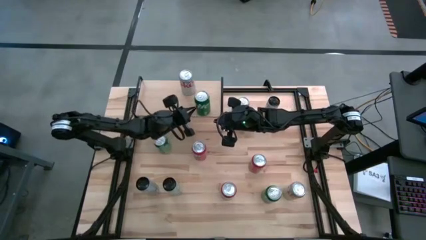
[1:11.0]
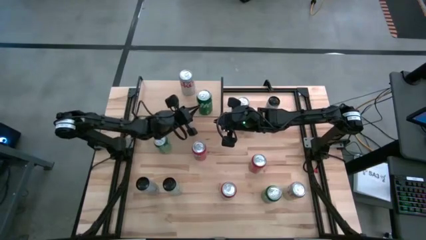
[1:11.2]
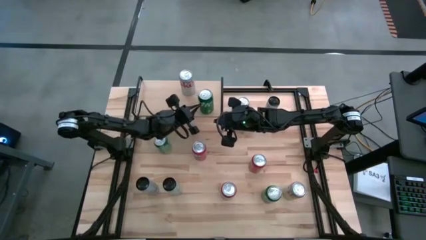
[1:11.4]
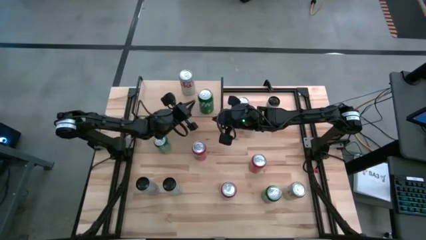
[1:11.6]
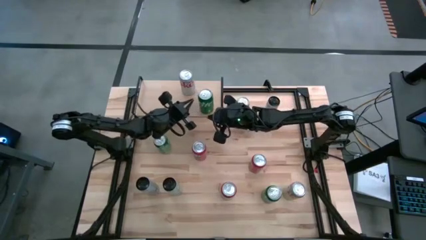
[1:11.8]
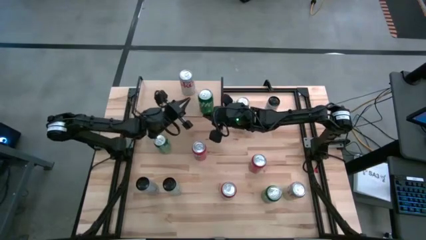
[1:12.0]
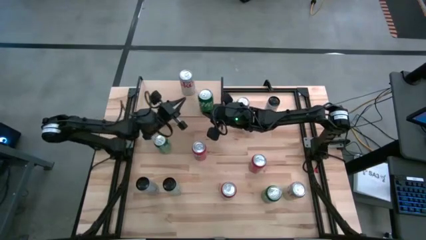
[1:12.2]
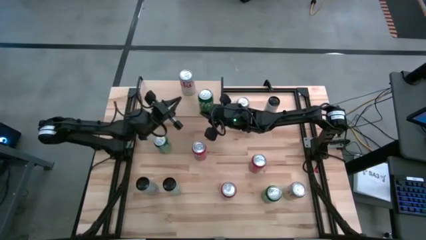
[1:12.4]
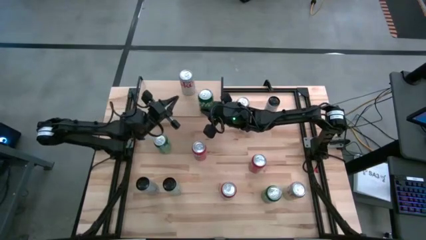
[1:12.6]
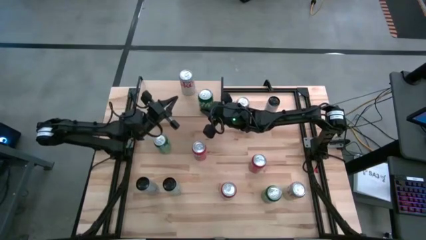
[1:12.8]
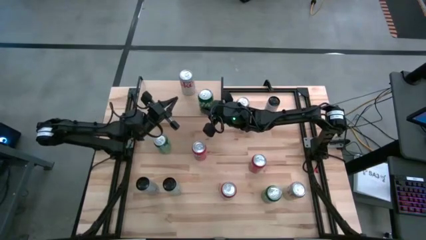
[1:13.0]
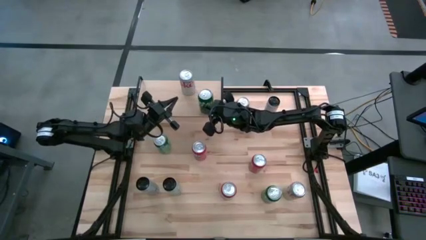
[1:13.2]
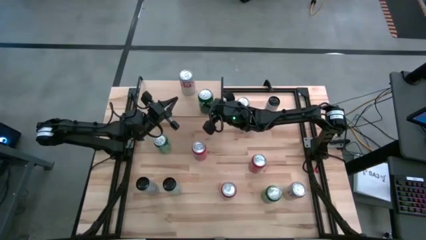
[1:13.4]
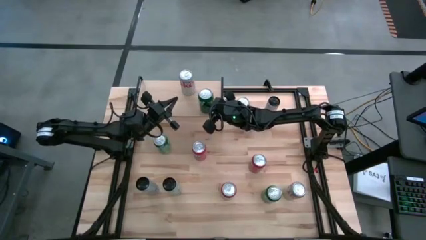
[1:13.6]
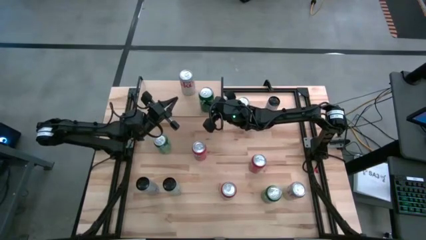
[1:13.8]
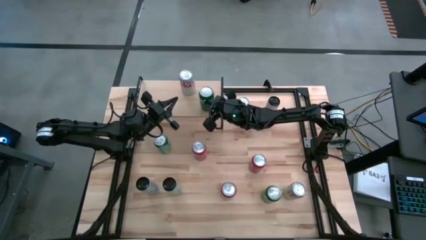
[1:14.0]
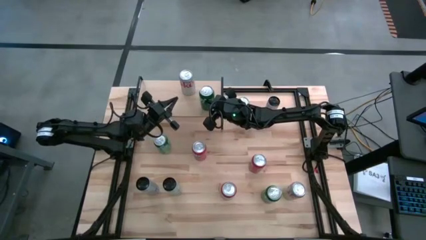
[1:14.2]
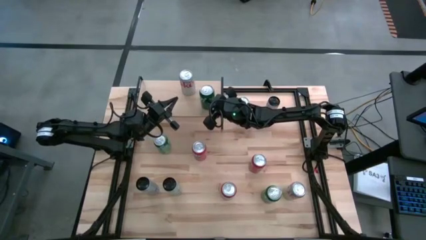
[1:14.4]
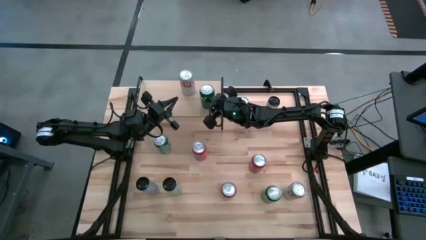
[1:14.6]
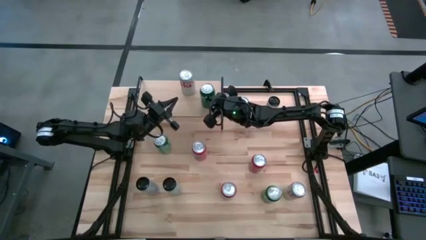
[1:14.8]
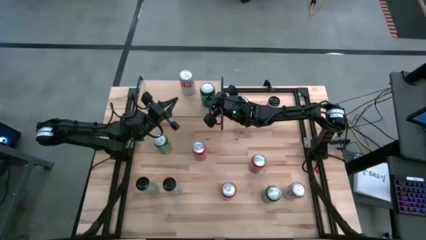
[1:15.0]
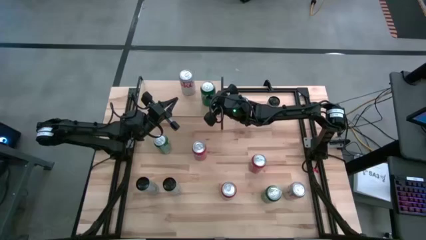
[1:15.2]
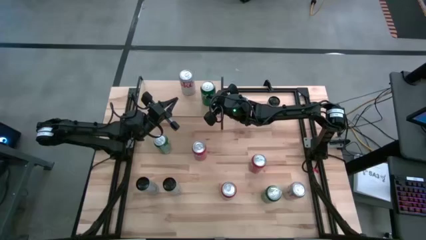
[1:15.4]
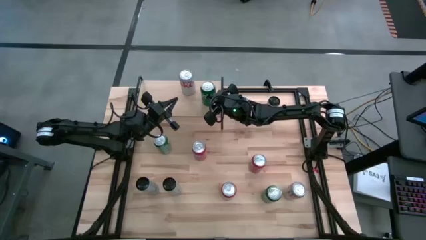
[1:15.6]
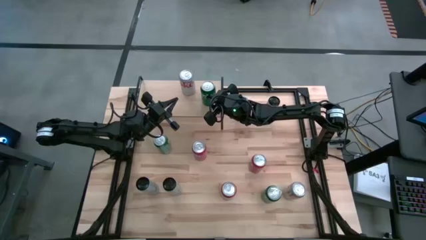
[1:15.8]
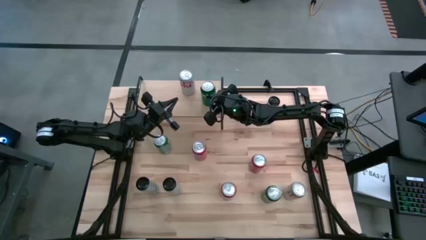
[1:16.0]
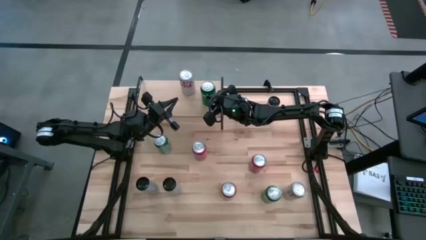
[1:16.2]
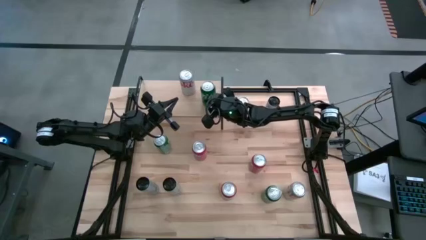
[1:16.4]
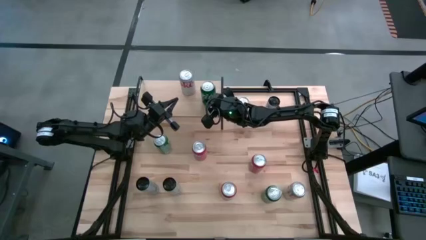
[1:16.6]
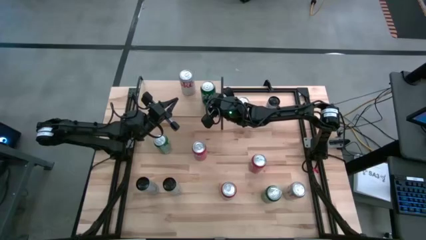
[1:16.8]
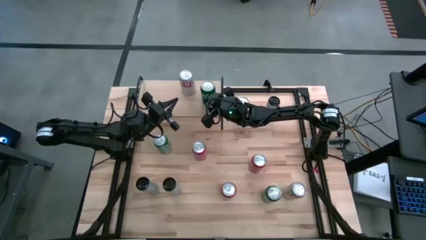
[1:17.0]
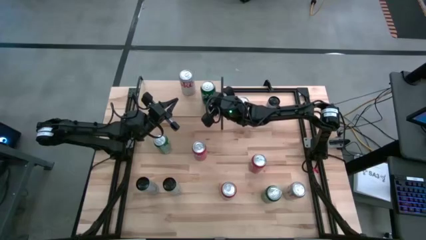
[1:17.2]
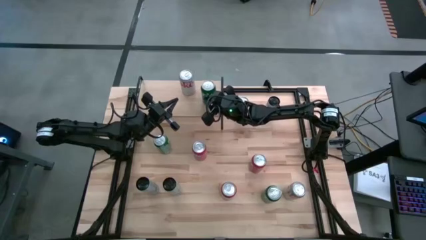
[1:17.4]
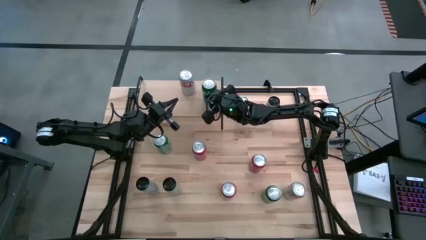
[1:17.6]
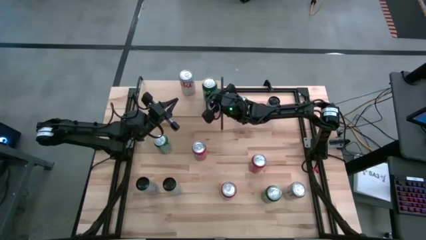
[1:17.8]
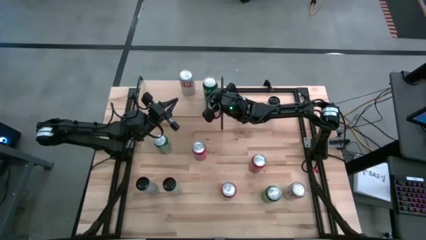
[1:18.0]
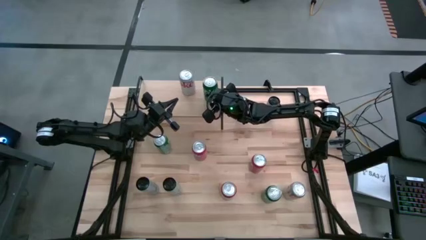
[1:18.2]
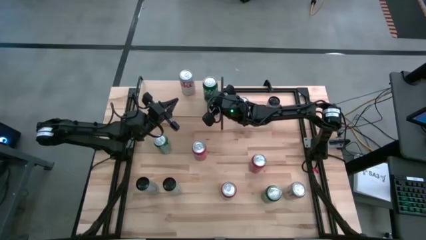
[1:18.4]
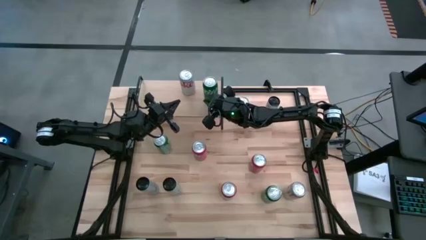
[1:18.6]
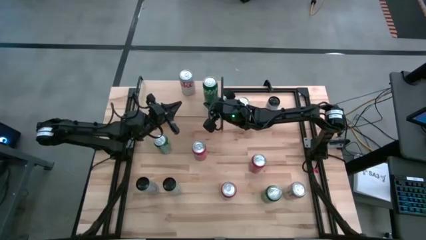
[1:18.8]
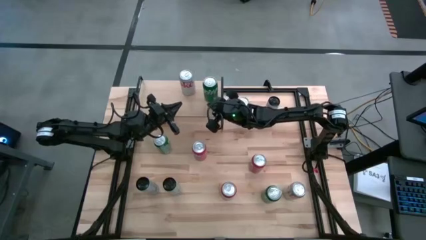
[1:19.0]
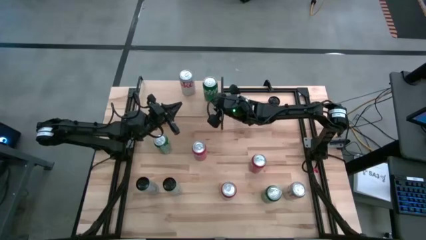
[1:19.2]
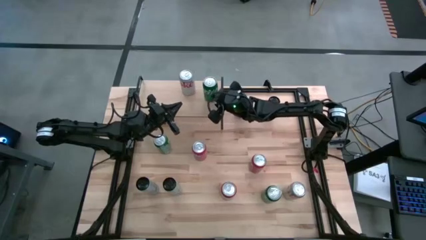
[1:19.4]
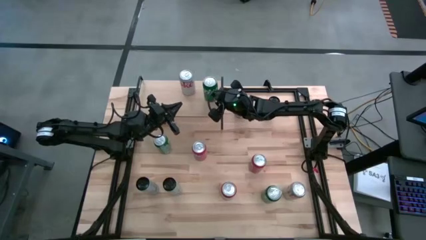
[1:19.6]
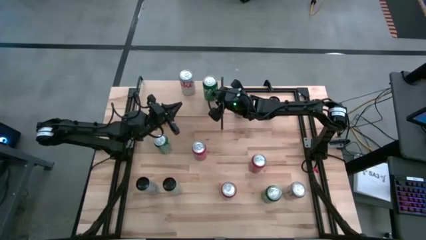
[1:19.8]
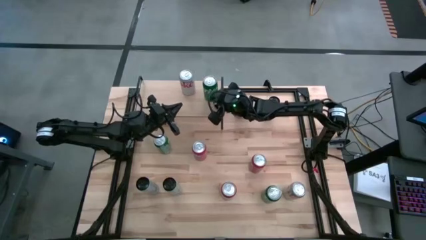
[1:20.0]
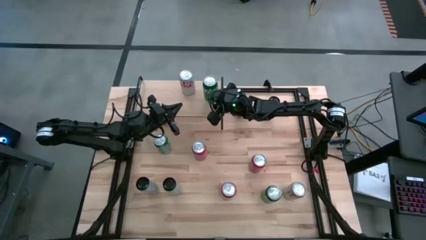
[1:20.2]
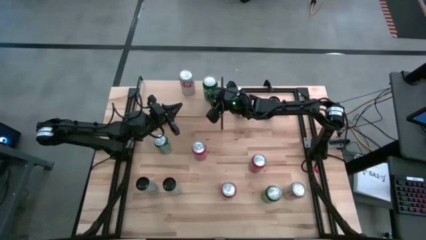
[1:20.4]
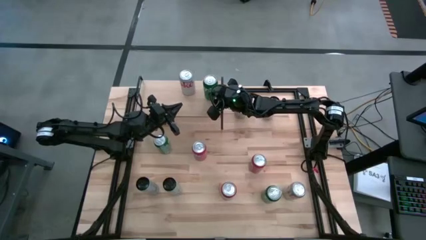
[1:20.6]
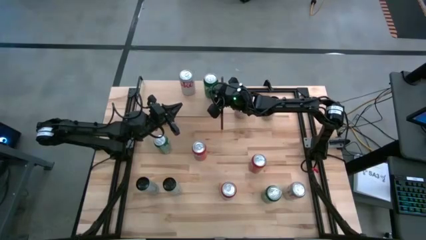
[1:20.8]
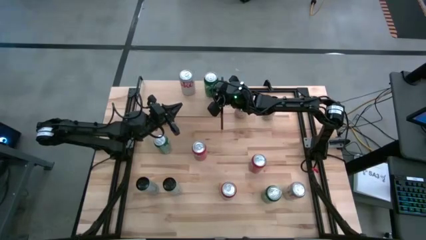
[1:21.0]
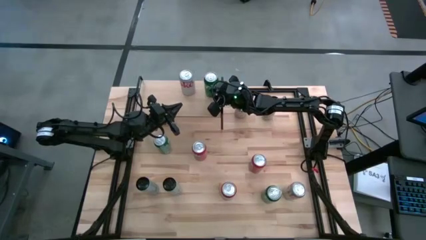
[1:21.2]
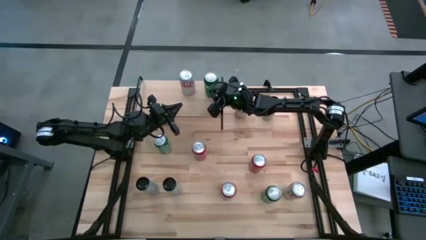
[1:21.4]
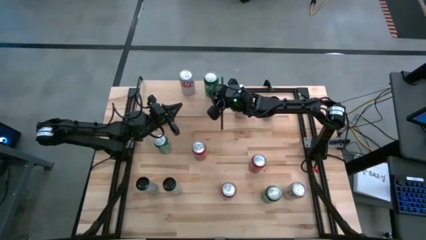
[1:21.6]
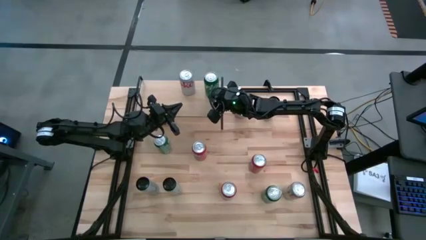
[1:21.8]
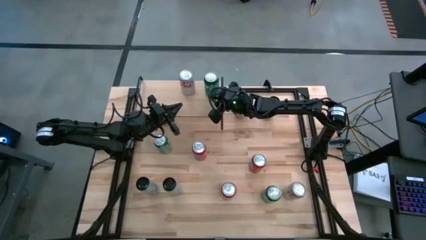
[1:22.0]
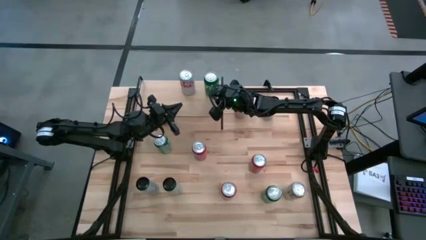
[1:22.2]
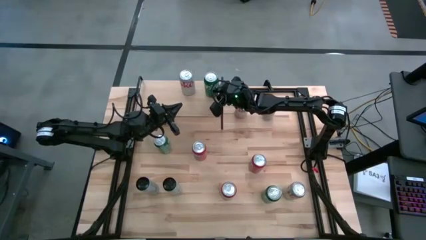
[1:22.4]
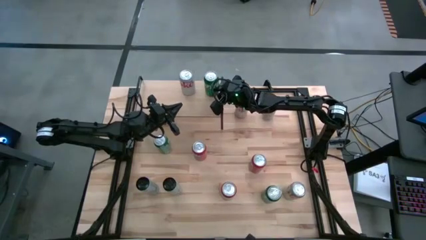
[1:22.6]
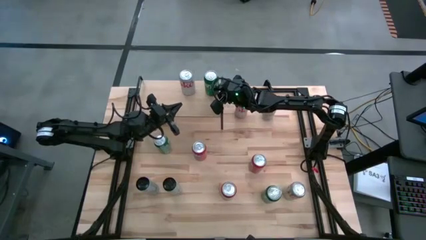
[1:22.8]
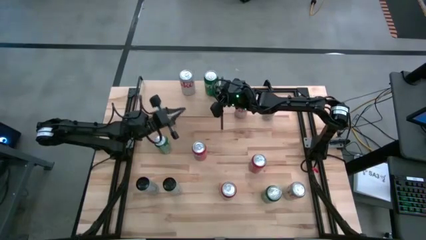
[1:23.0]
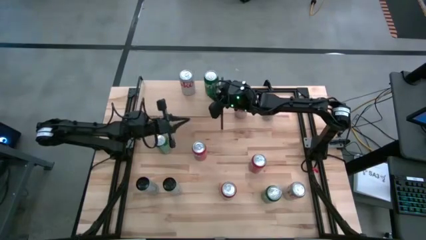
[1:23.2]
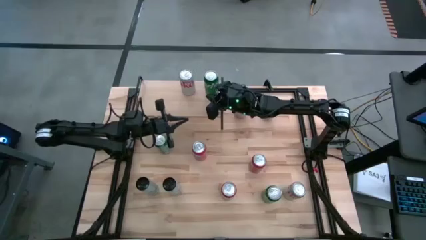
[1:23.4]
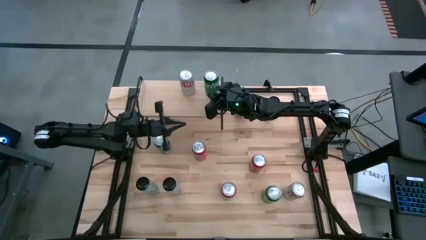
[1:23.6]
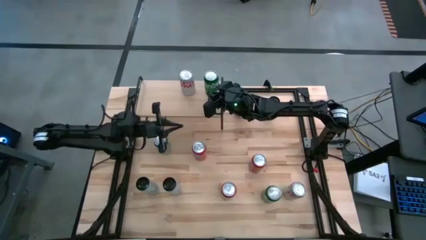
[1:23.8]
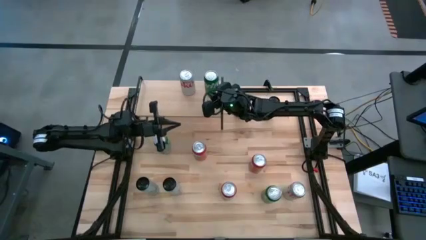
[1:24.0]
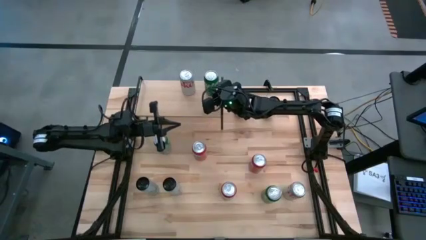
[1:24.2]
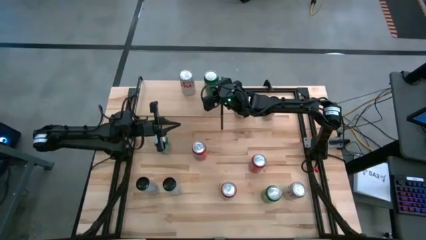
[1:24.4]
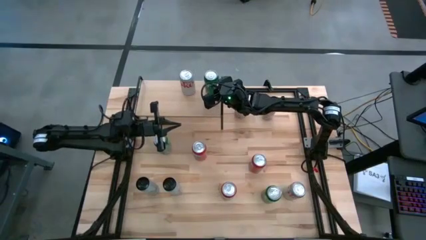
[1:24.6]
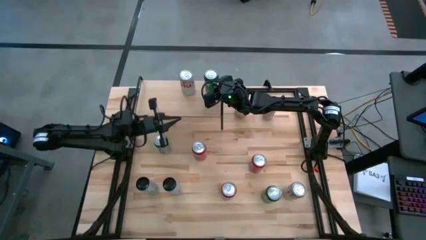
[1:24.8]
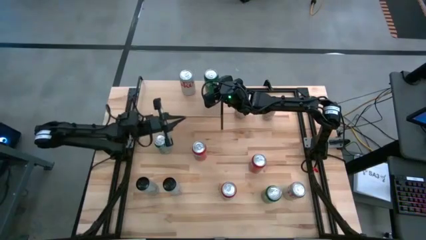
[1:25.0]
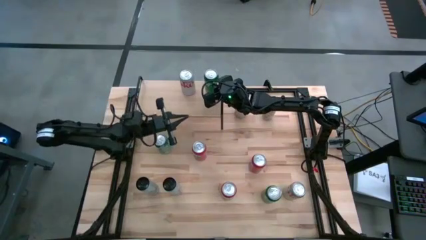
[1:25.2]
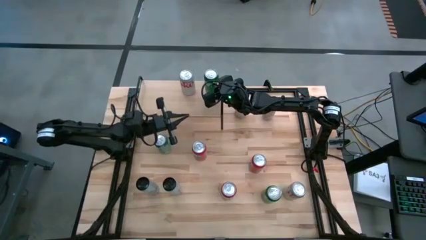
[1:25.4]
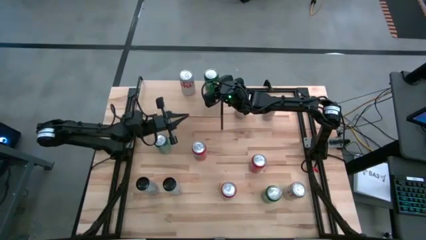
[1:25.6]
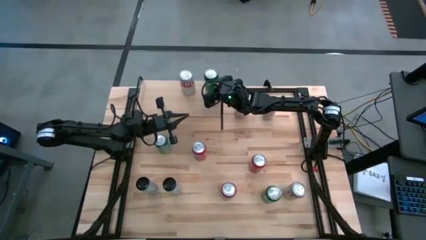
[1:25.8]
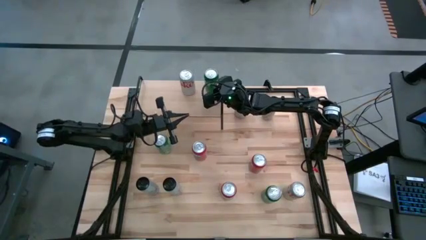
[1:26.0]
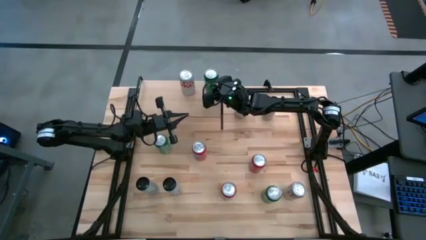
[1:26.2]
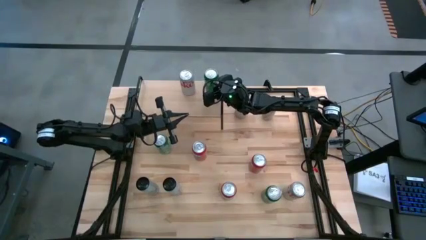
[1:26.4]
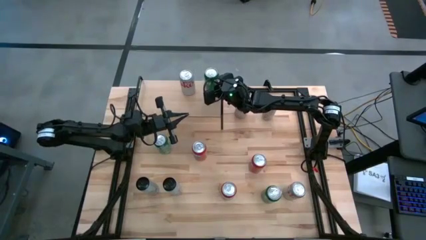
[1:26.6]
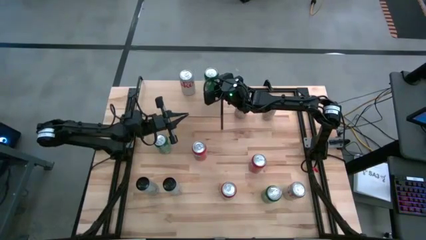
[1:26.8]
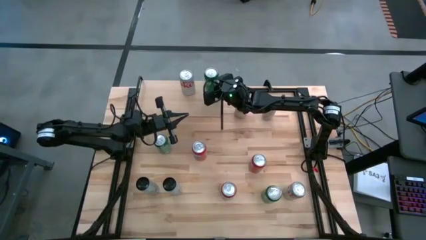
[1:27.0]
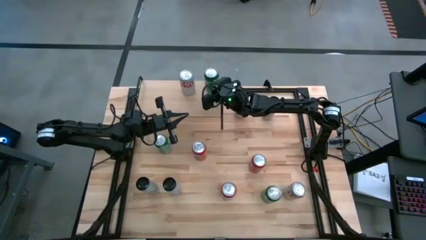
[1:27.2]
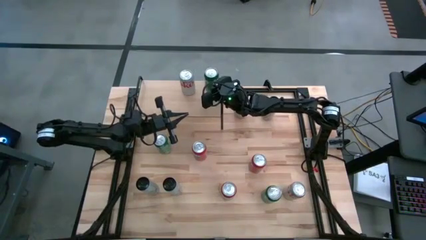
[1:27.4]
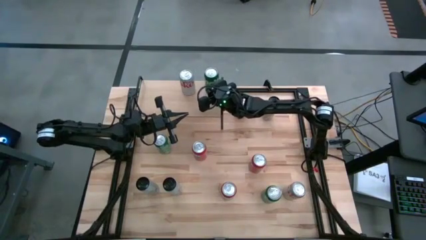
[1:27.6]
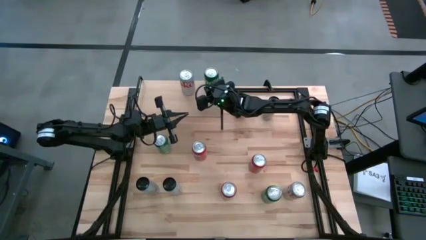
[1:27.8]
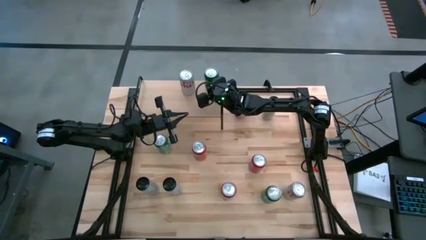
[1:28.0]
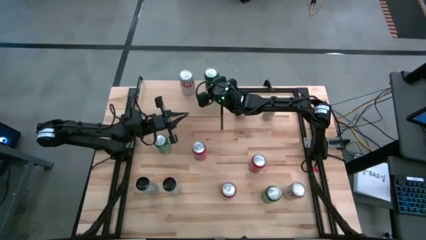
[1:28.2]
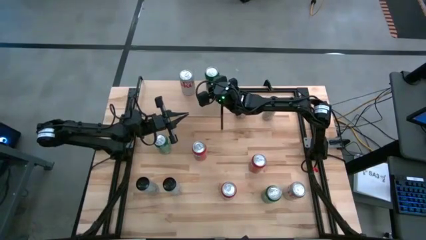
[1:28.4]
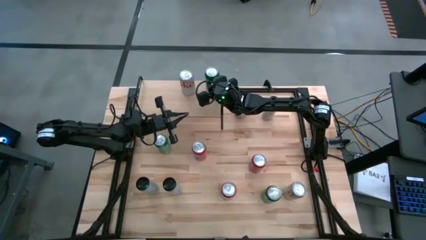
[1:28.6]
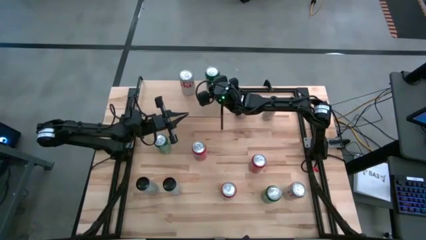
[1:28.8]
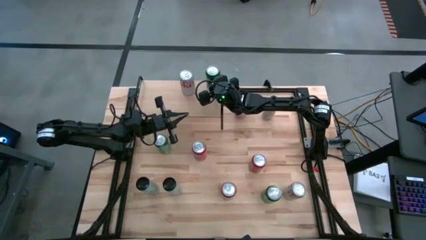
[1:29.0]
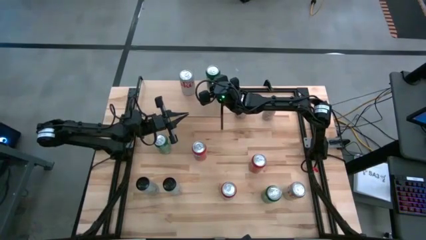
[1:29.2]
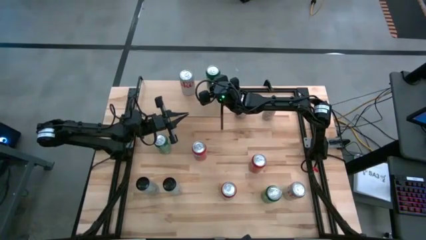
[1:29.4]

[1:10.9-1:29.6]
Task: Place canned beverage on shelf
Put the middle green soda can on the shelf
